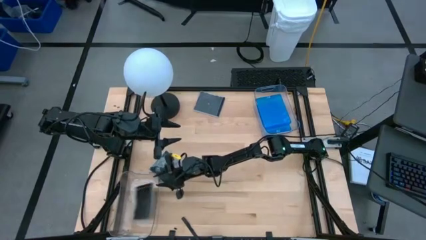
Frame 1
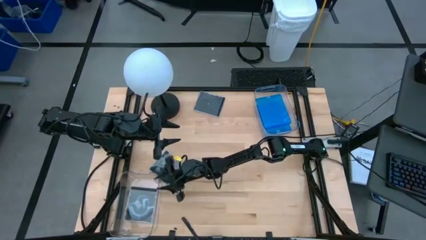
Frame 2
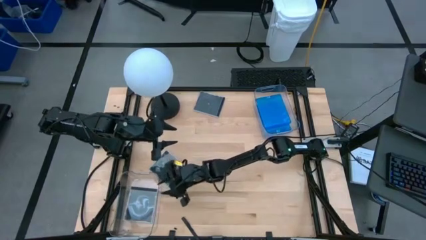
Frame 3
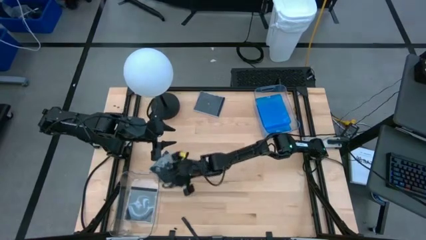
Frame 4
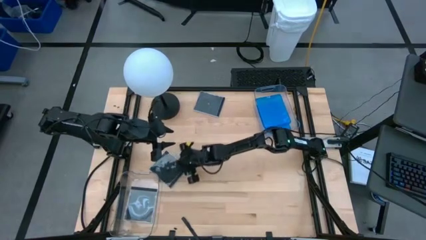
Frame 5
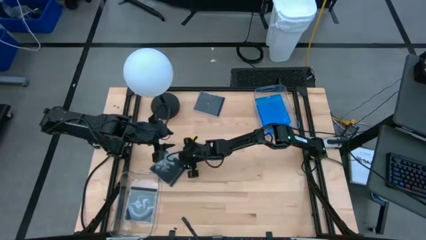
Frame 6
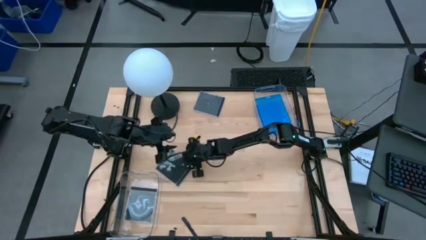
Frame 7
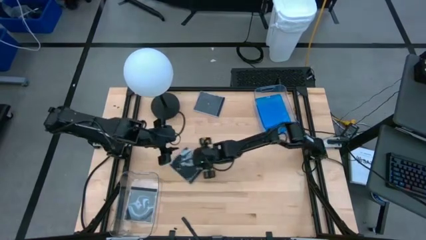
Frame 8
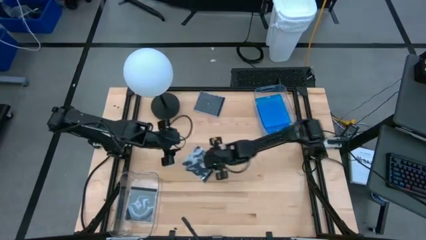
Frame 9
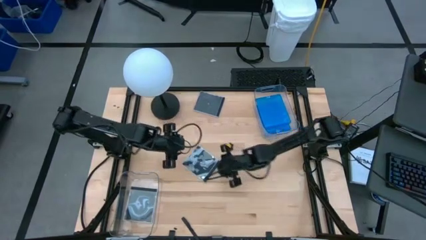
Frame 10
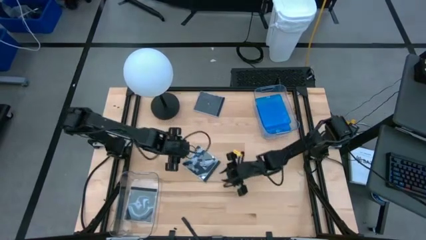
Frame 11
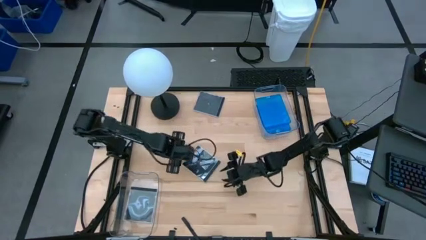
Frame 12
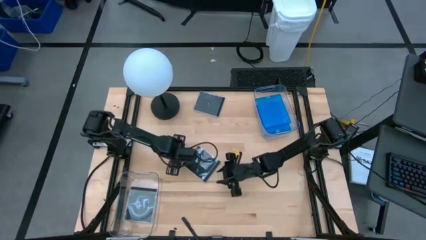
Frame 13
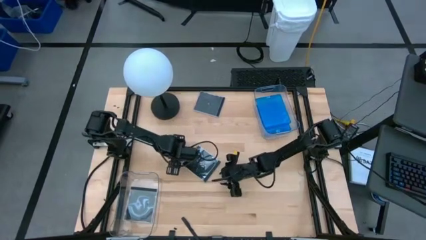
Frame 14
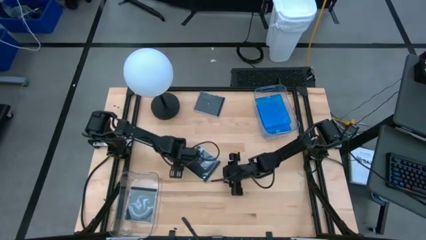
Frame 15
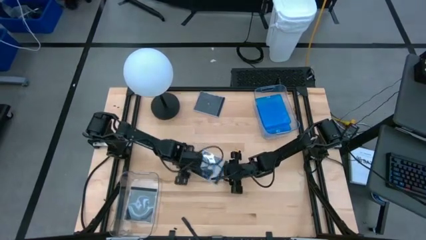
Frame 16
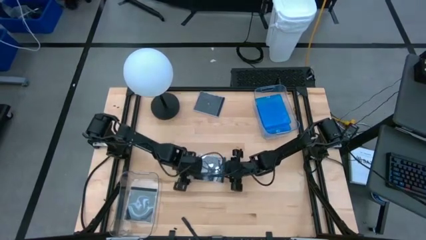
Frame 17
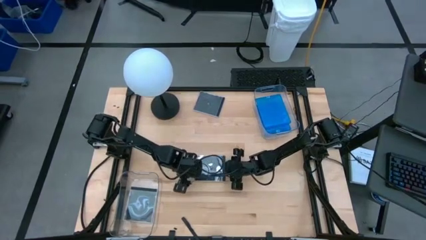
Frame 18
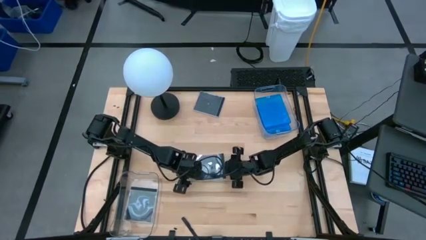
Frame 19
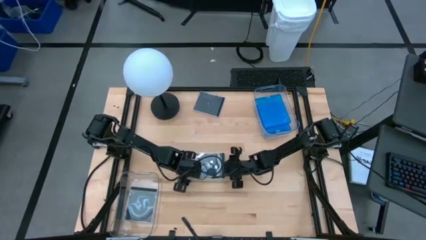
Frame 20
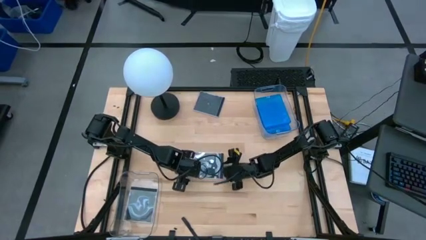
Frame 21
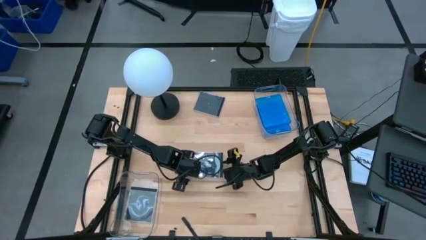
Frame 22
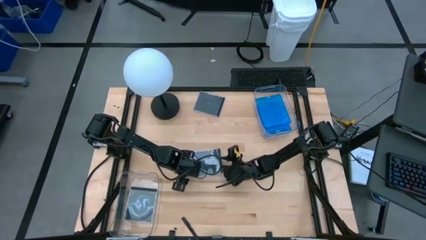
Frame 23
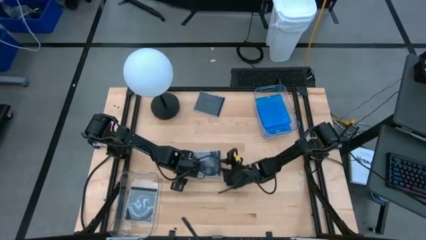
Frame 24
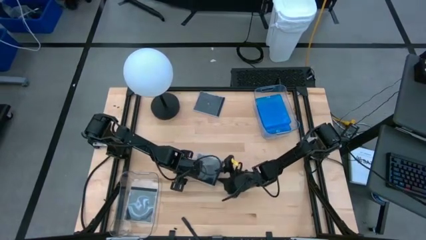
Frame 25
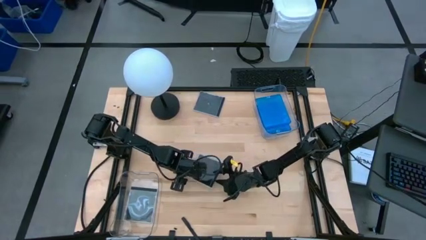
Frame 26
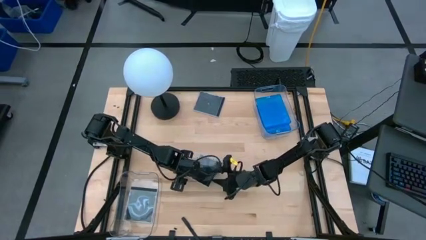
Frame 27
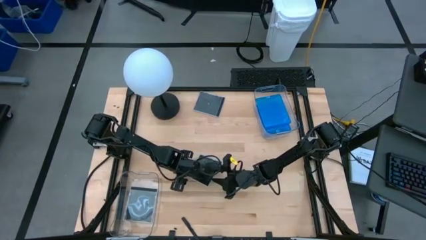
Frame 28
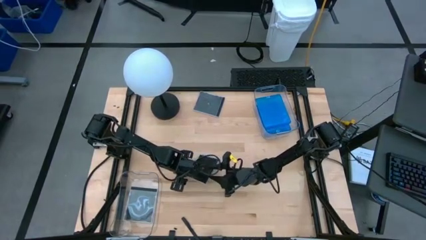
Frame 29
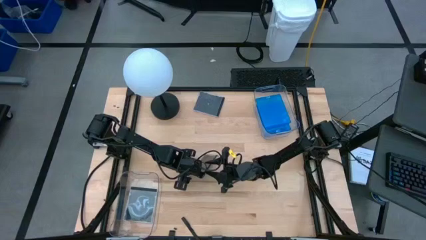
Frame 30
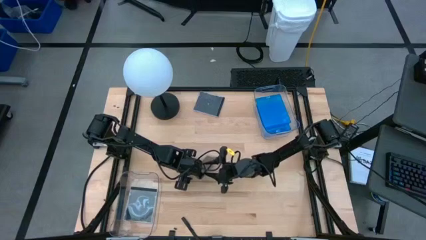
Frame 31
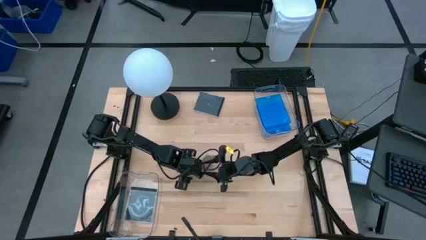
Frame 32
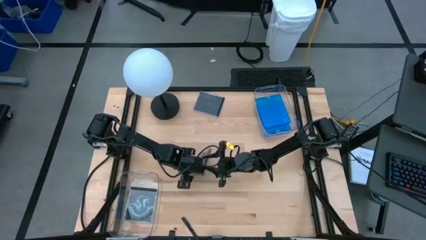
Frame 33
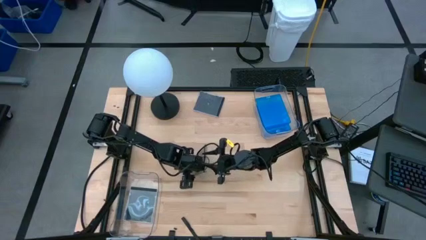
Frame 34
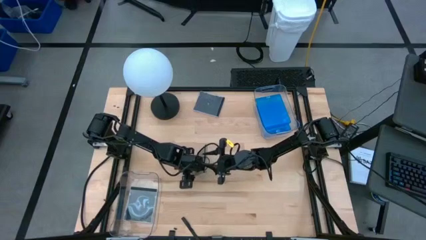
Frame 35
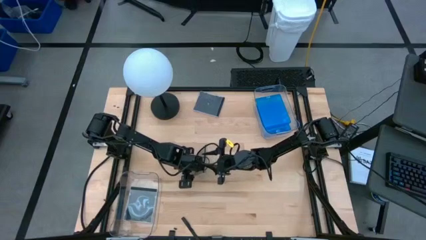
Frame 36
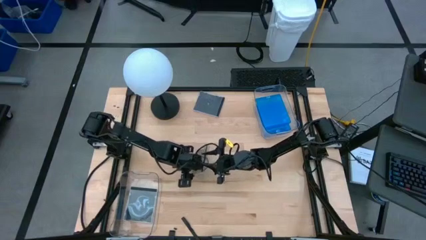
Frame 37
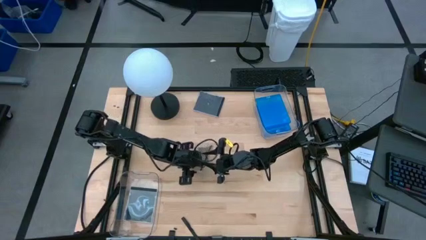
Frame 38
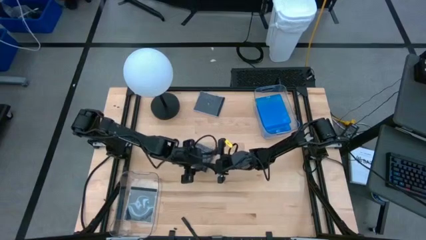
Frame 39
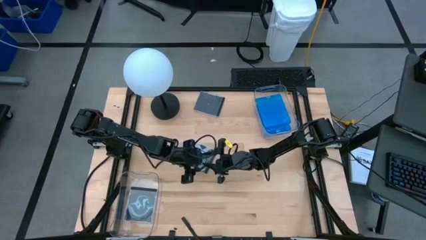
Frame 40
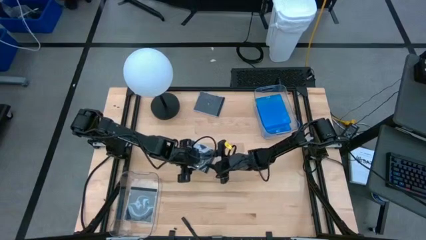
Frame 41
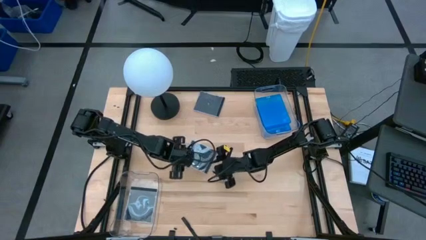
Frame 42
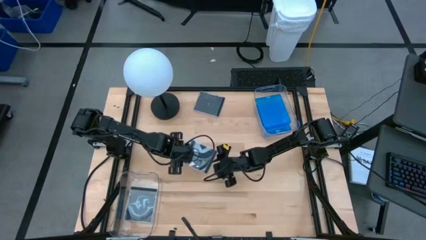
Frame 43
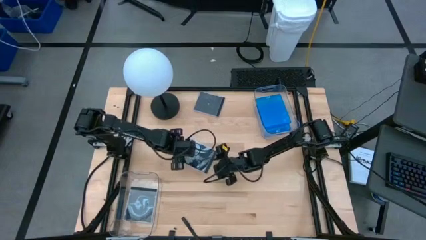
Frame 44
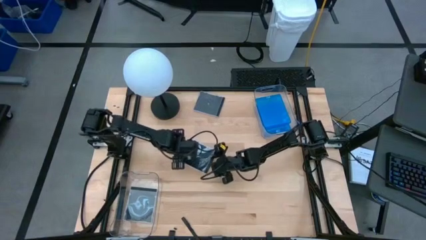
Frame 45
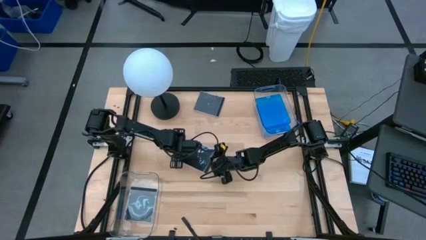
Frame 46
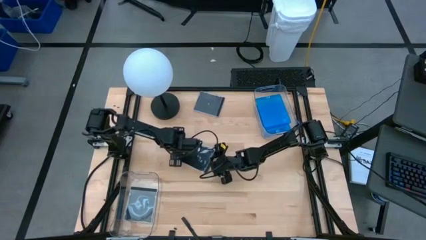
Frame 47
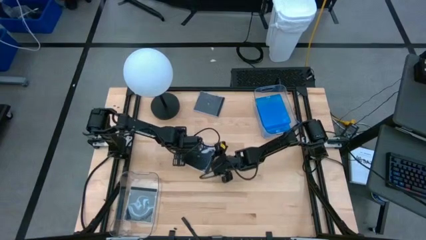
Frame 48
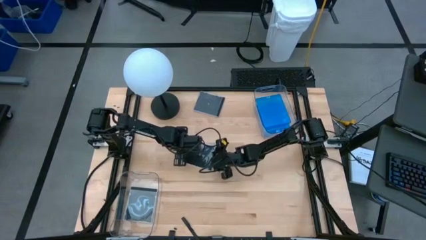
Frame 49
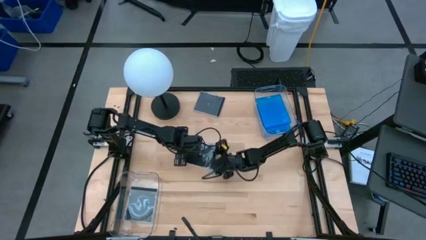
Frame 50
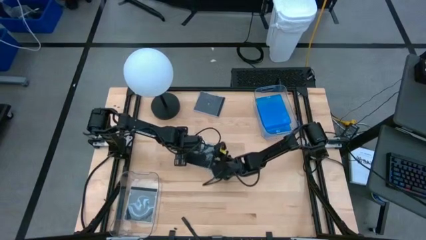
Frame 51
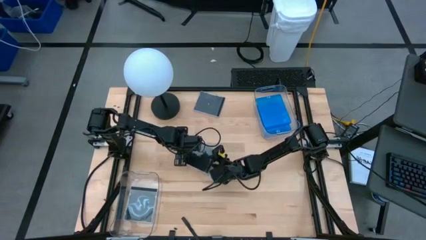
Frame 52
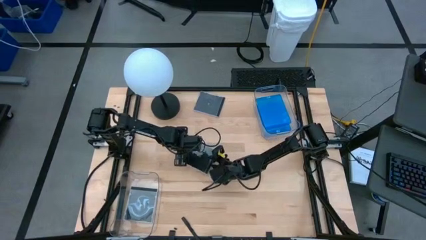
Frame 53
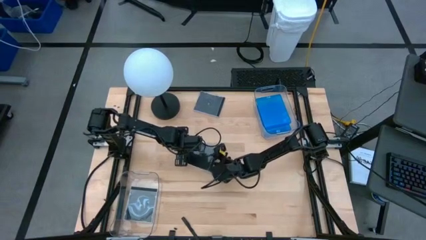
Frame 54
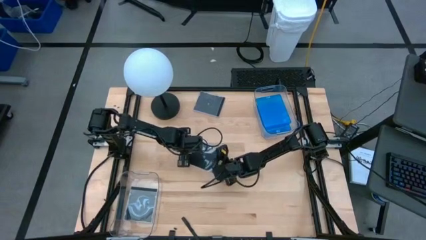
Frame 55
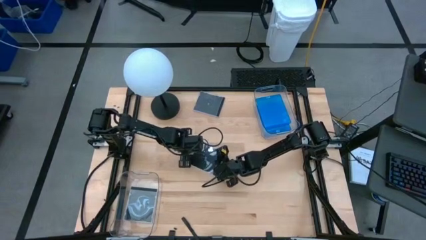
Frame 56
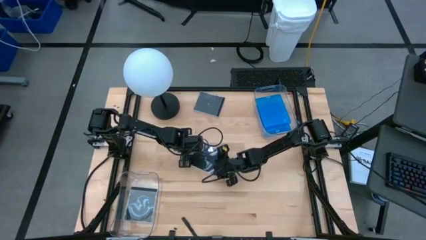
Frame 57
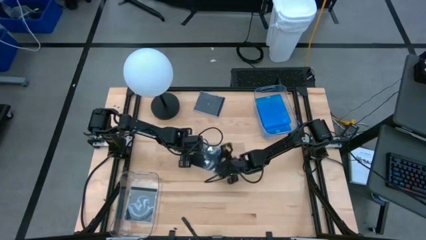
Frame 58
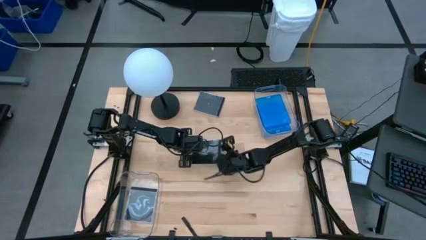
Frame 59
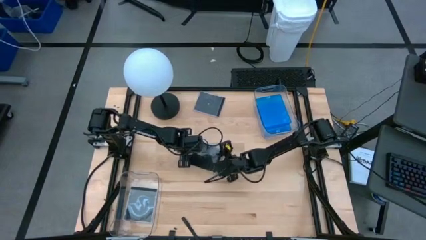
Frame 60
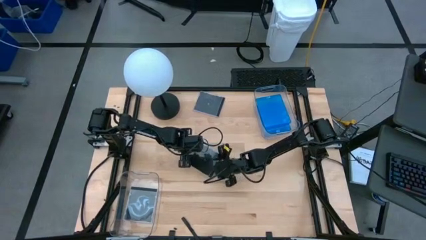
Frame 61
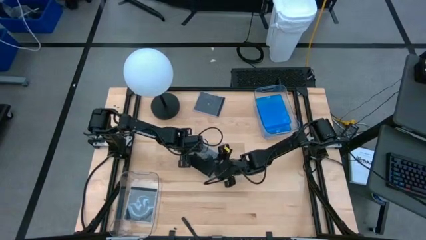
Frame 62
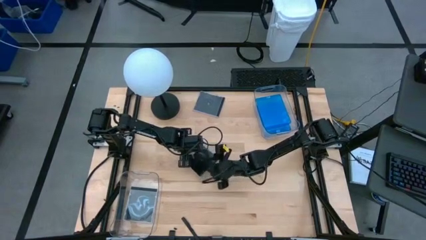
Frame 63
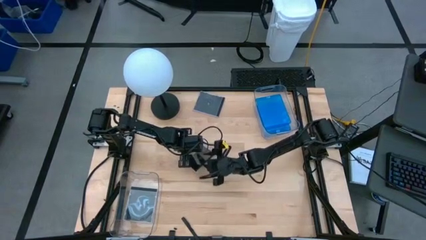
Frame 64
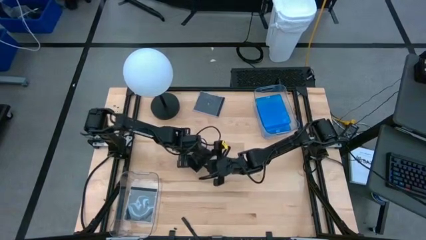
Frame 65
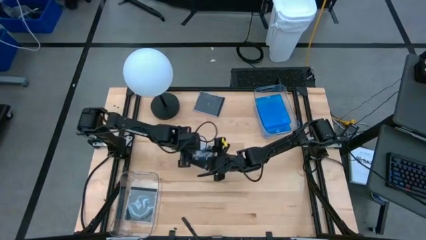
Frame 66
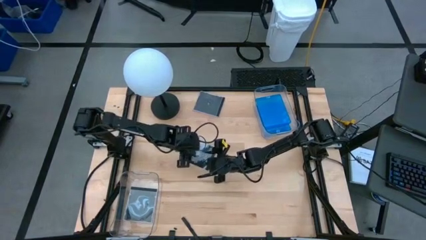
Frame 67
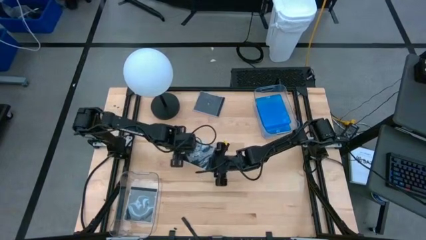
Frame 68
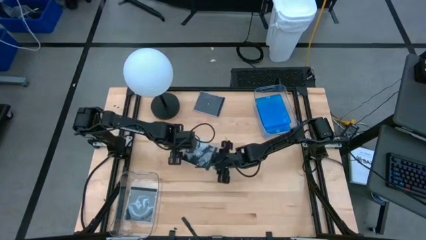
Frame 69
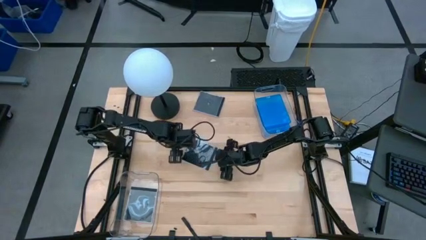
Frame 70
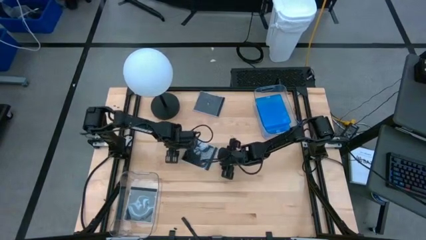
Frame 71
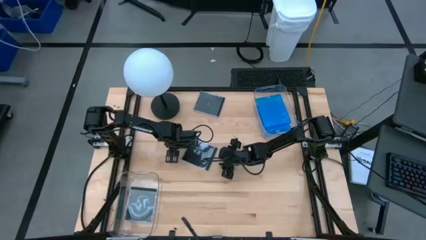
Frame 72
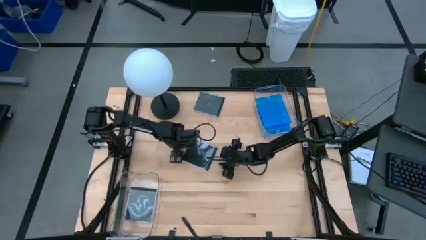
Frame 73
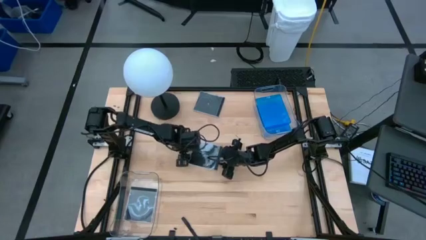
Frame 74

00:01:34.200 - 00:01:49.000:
Task: Pick & place jewel cases by type
Put the bottom black CD case into the bottom transparent bin

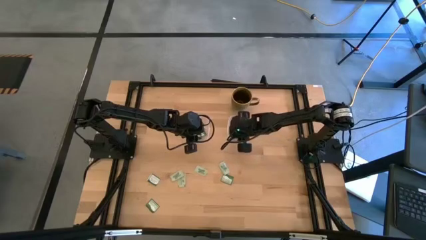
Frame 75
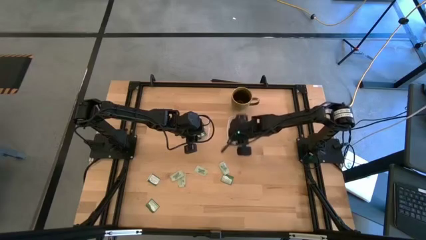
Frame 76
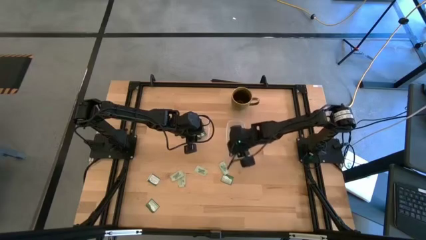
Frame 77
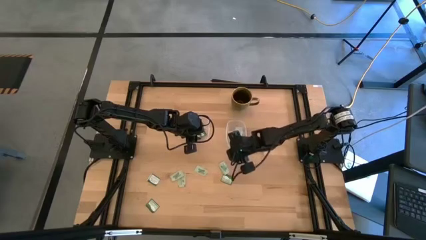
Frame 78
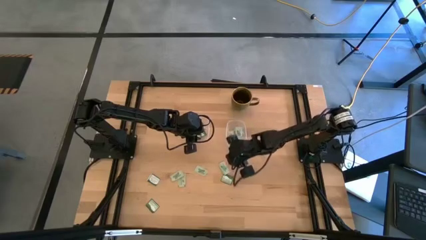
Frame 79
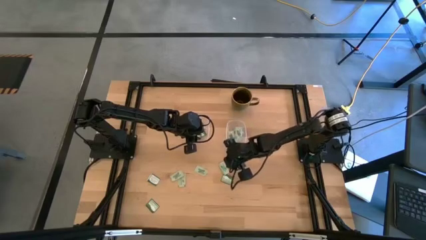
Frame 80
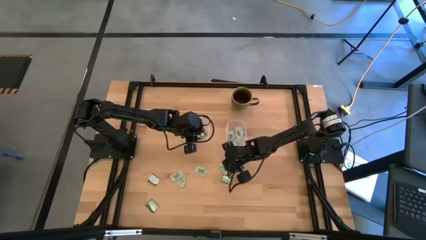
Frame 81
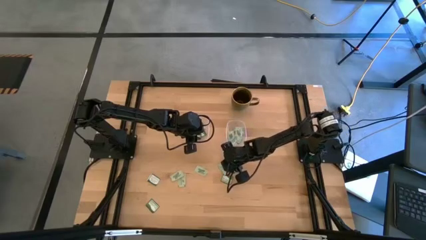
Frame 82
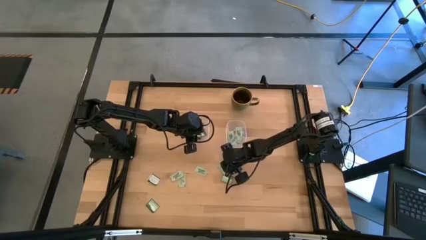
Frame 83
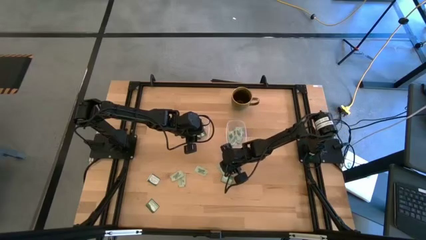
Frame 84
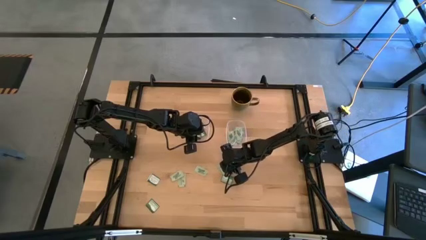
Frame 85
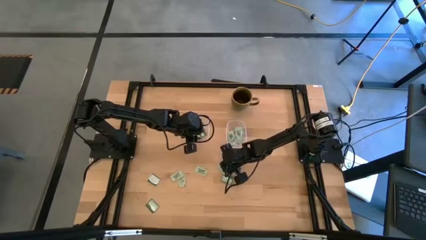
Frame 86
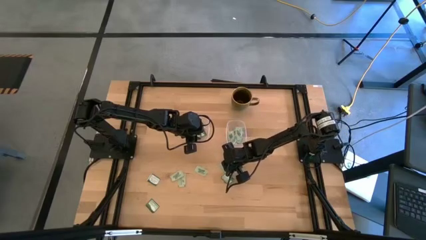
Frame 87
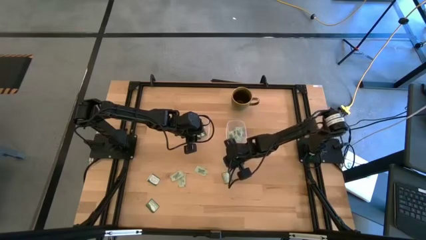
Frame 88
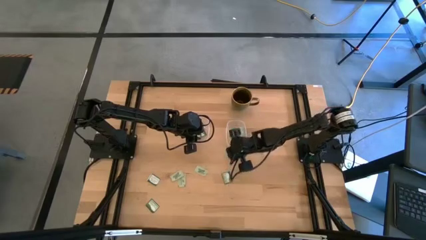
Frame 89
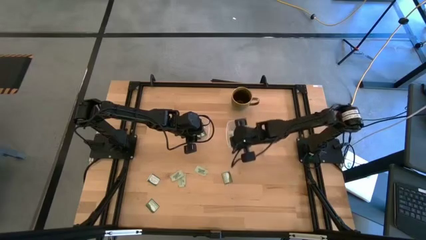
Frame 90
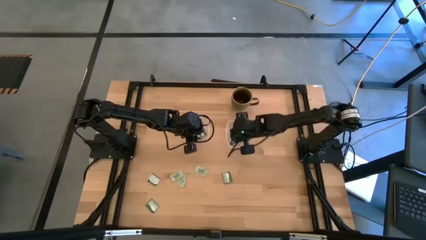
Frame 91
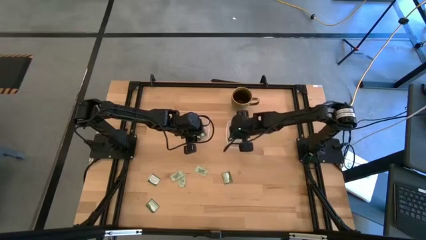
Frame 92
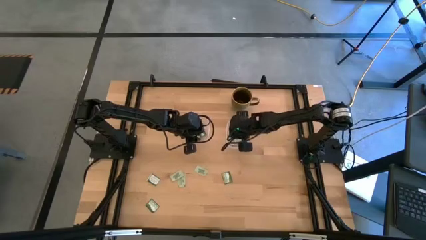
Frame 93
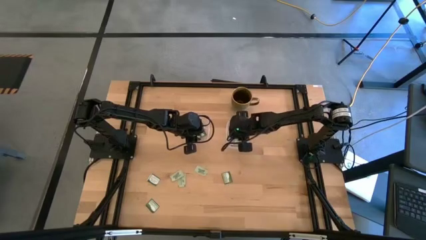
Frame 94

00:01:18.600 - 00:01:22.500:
Task: Pick and place items into bin
Put the stevia packet into the right transparent bin
